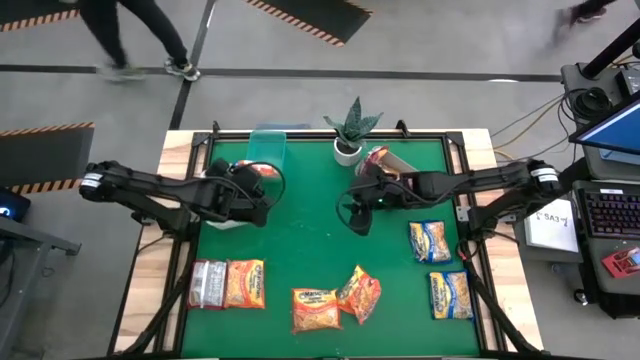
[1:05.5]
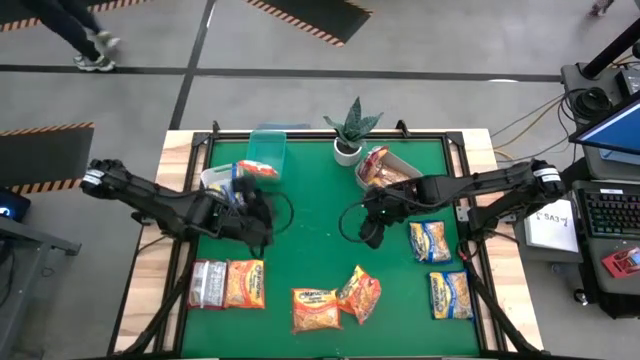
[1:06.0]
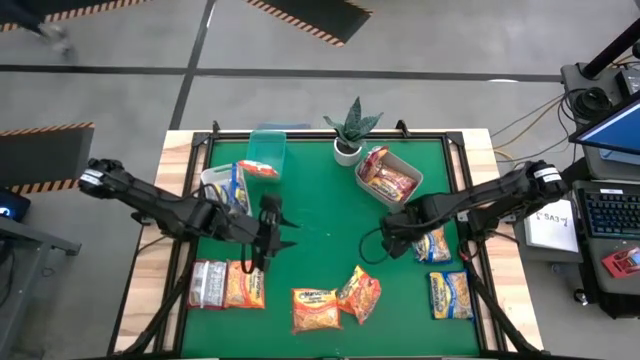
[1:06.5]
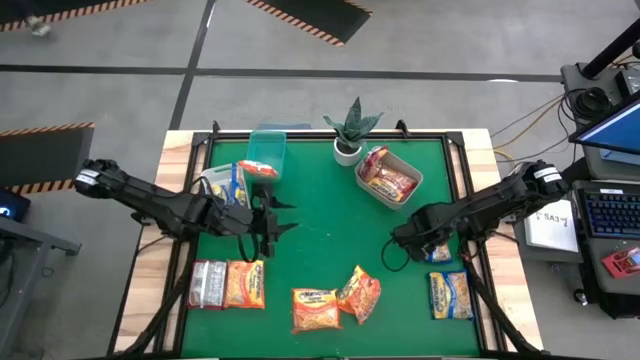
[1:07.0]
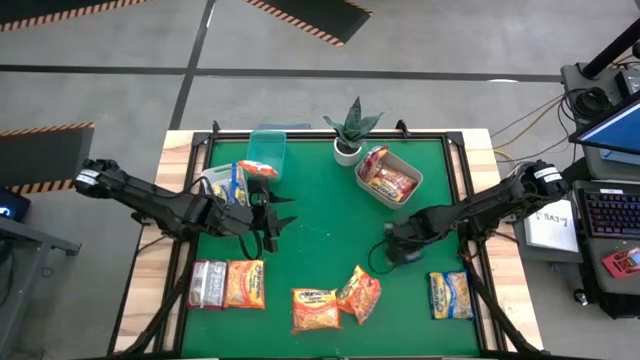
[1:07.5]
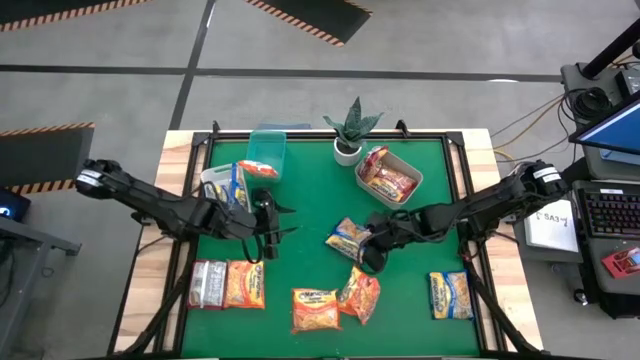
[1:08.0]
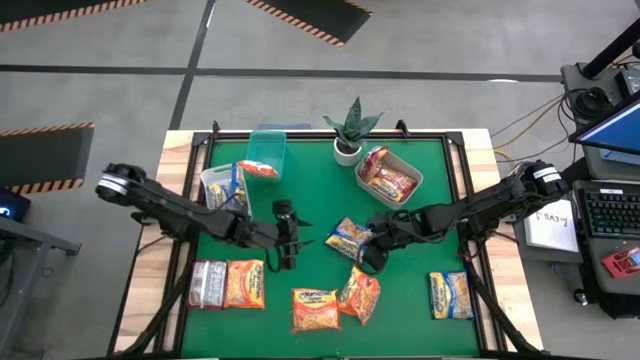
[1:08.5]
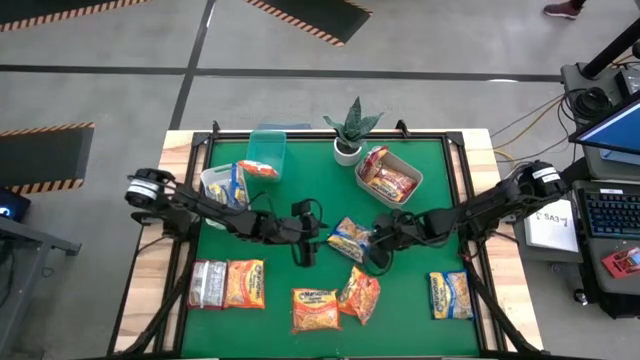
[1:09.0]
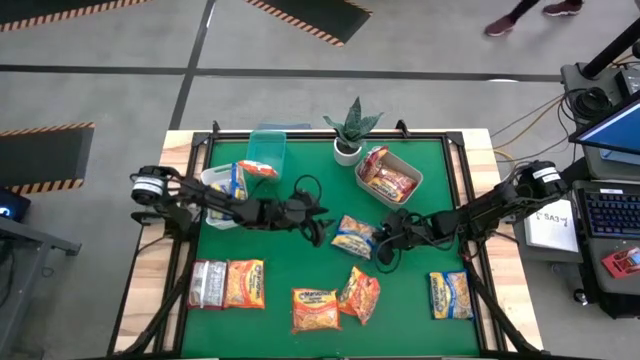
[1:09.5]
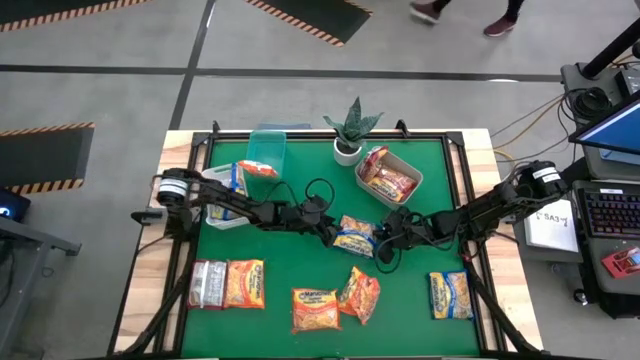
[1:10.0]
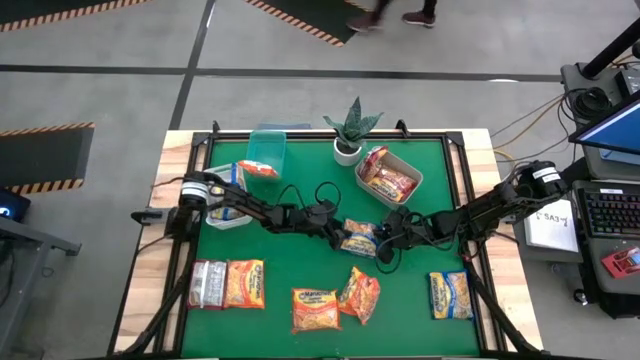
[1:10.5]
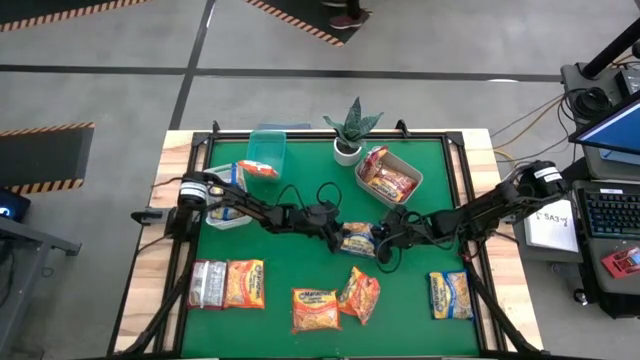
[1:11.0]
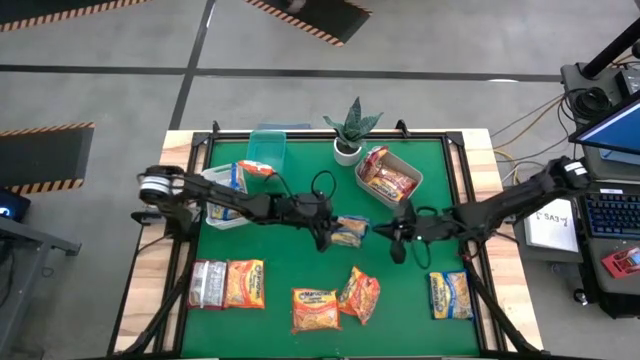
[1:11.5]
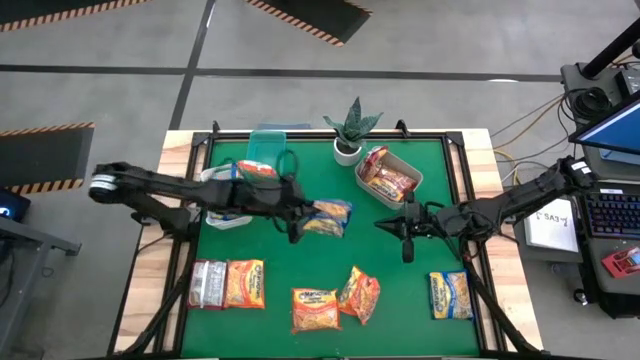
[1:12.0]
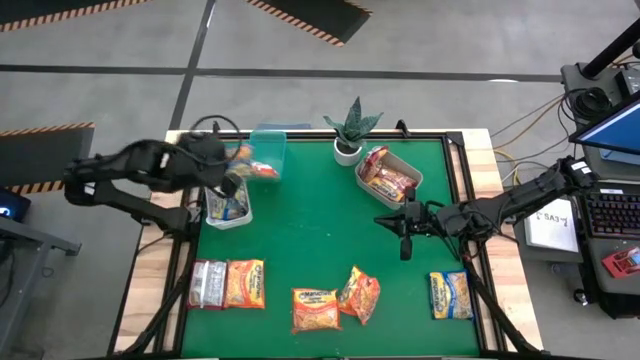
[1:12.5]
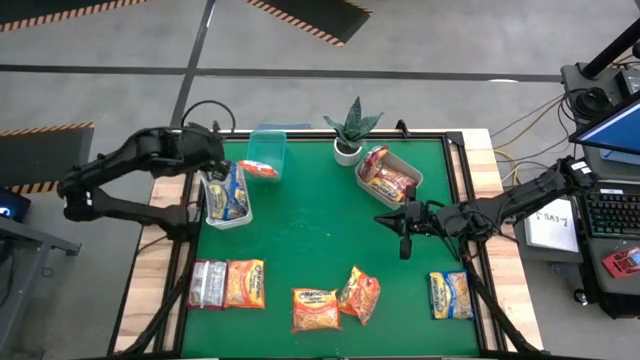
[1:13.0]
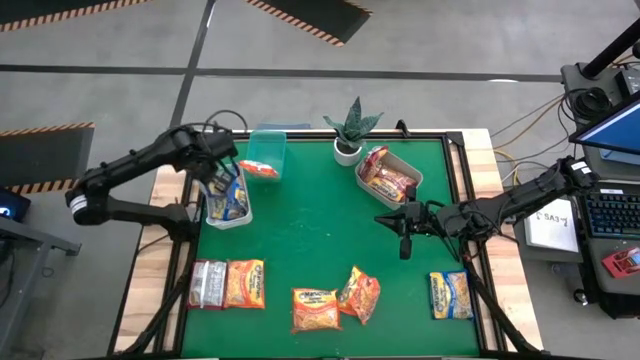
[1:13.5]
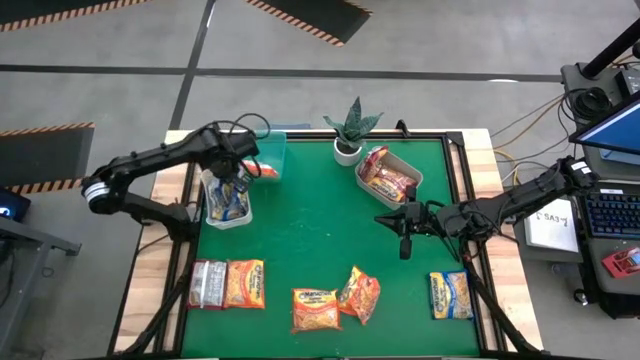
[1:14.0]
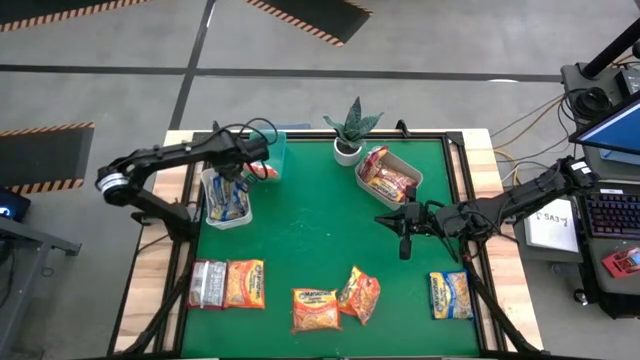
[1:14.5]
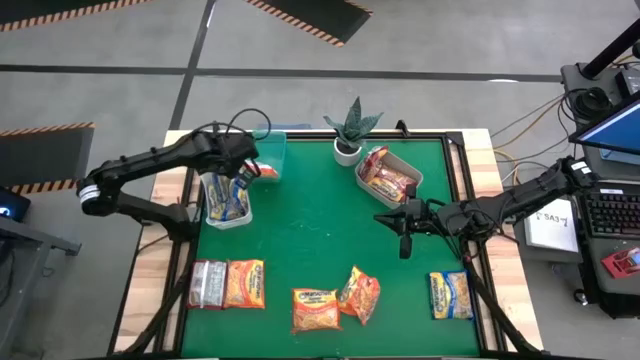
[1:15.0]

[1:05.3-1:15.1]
Task: Sort Maruchan noodles
Put the blue noodle pack into the white bin

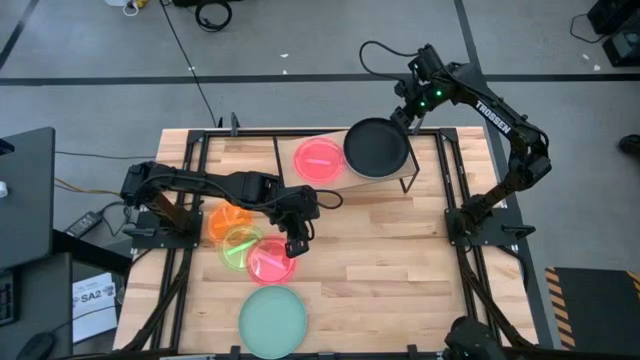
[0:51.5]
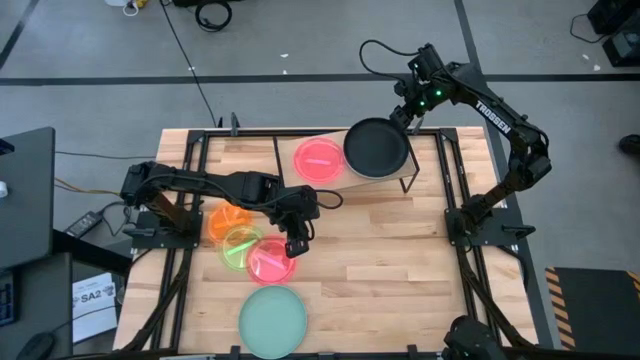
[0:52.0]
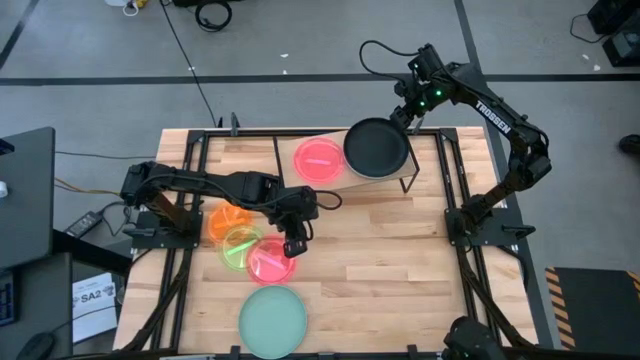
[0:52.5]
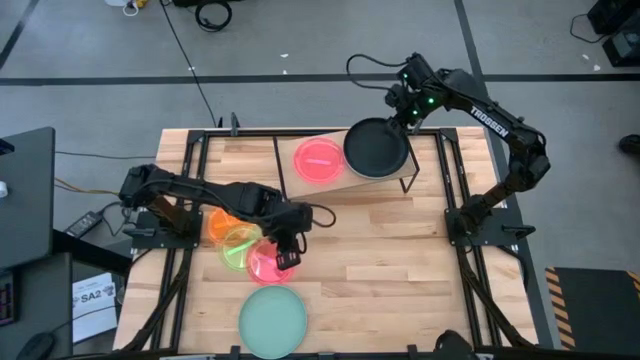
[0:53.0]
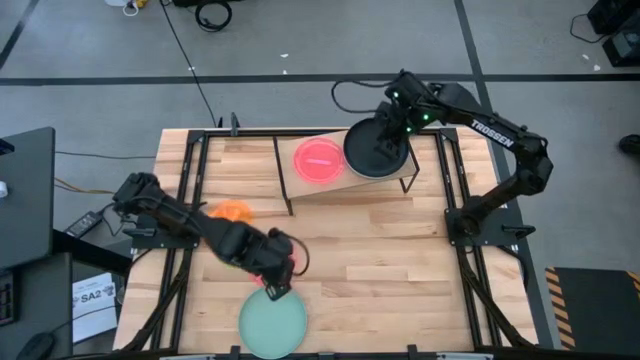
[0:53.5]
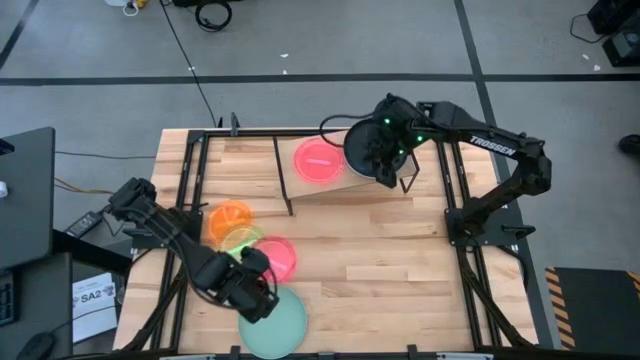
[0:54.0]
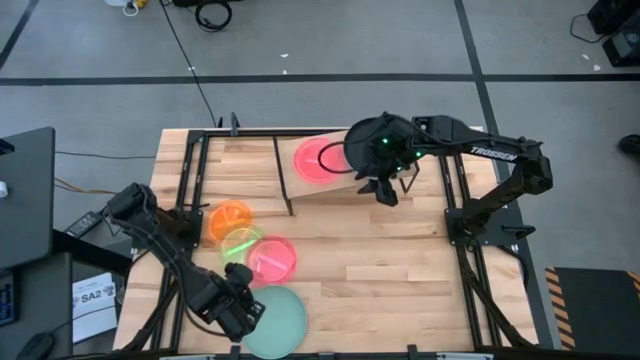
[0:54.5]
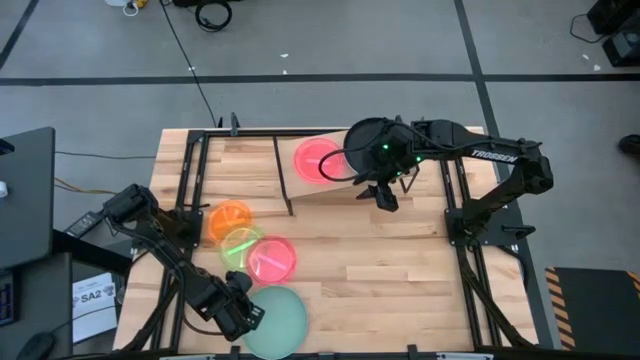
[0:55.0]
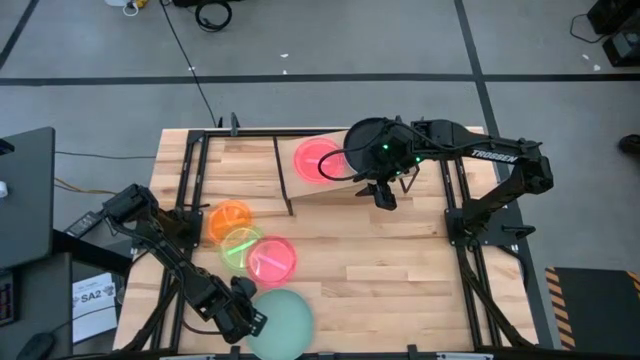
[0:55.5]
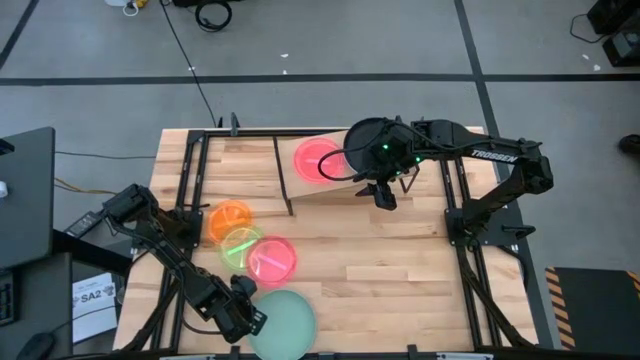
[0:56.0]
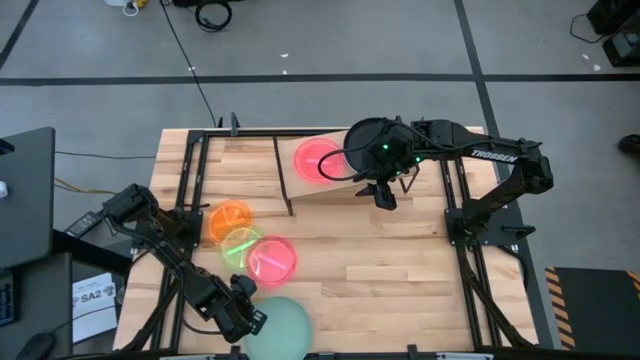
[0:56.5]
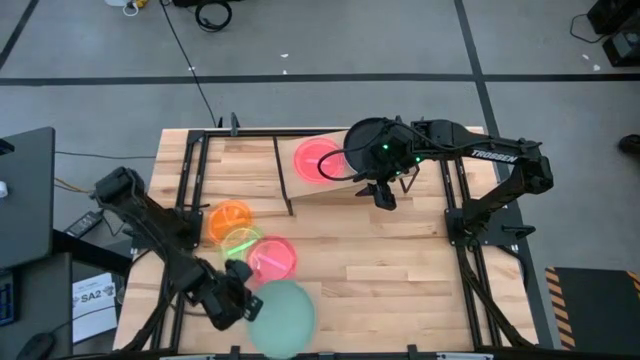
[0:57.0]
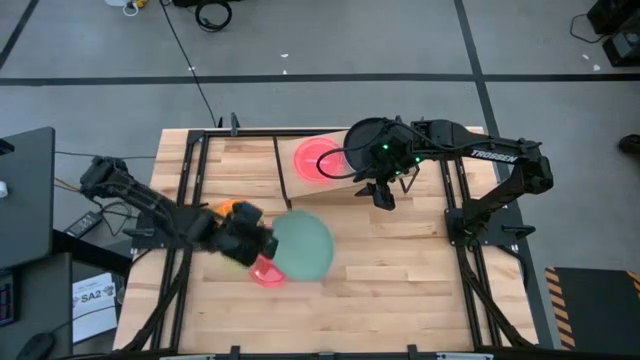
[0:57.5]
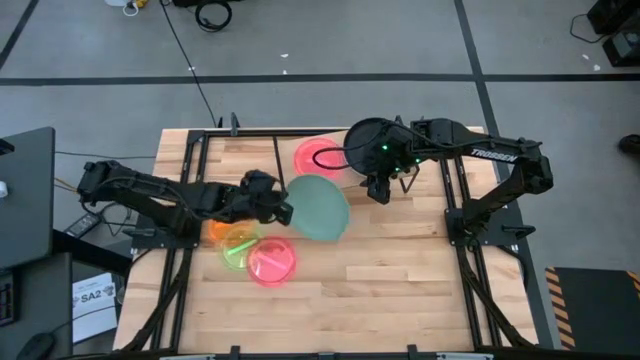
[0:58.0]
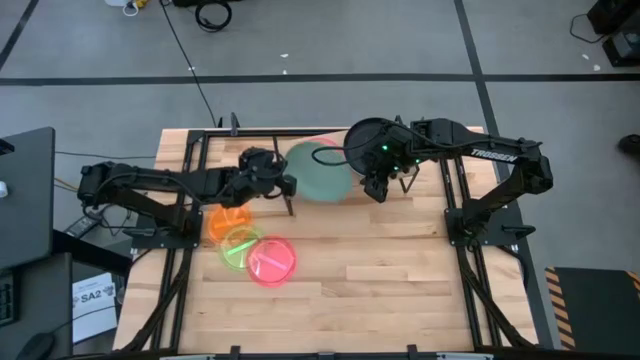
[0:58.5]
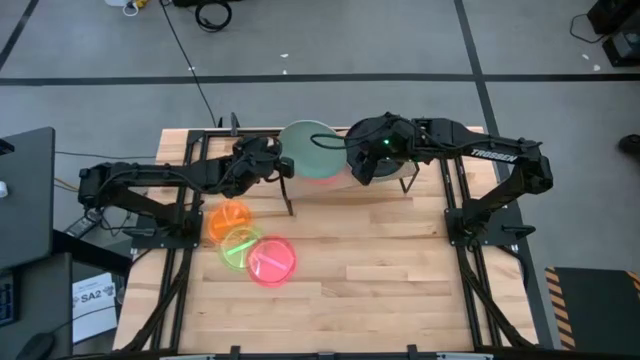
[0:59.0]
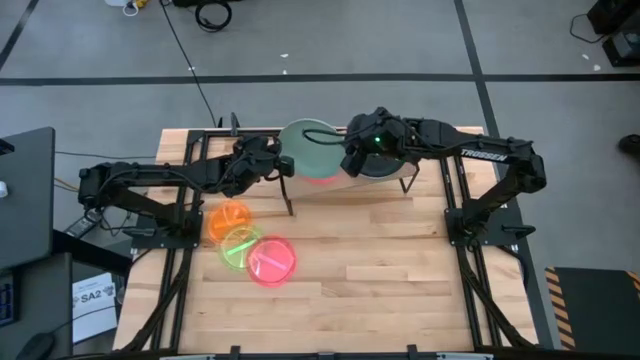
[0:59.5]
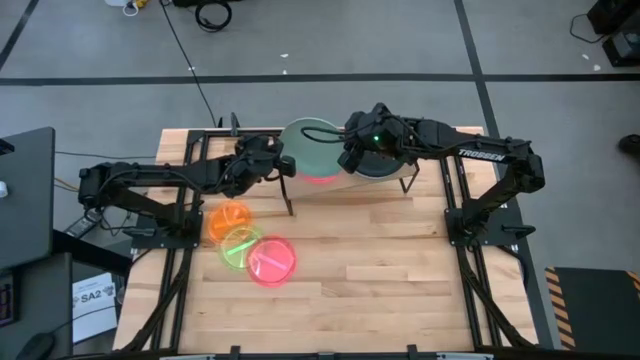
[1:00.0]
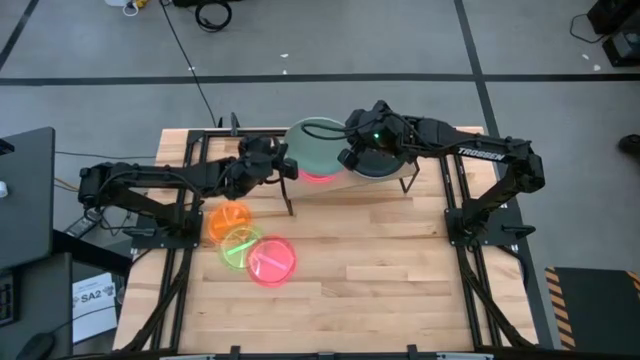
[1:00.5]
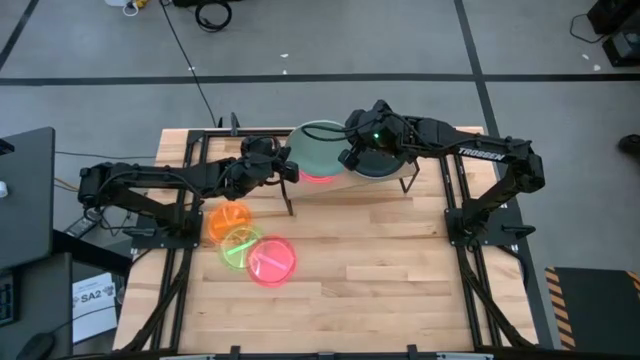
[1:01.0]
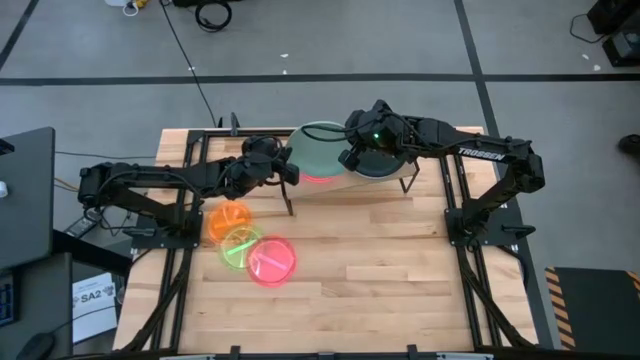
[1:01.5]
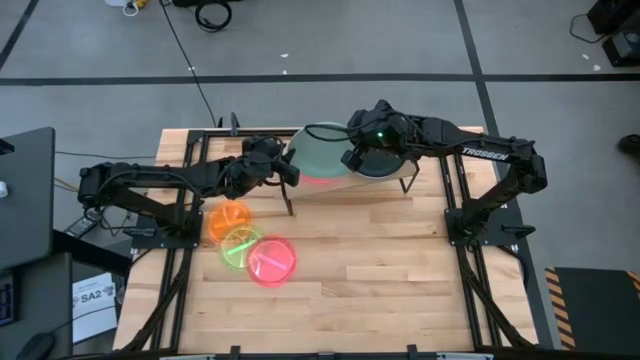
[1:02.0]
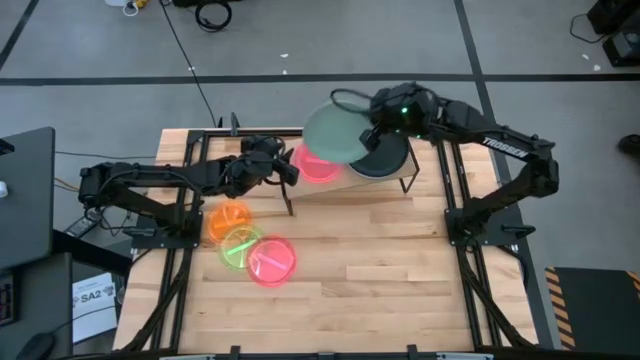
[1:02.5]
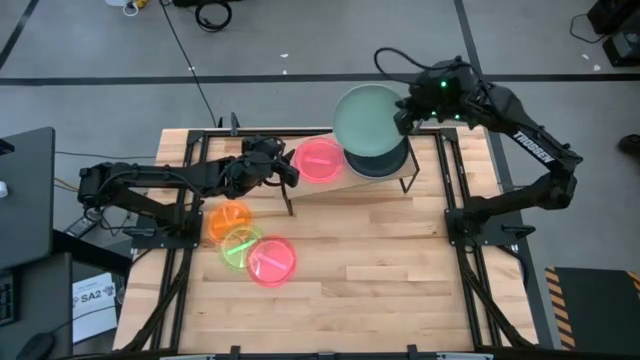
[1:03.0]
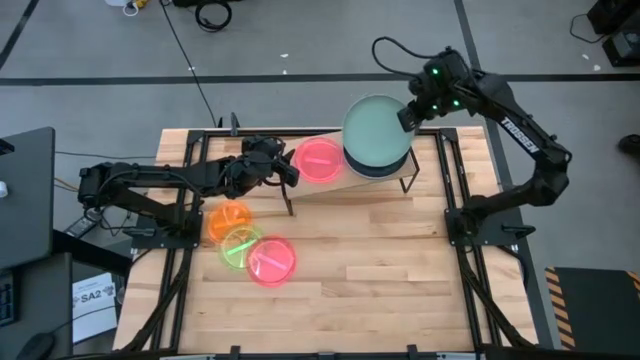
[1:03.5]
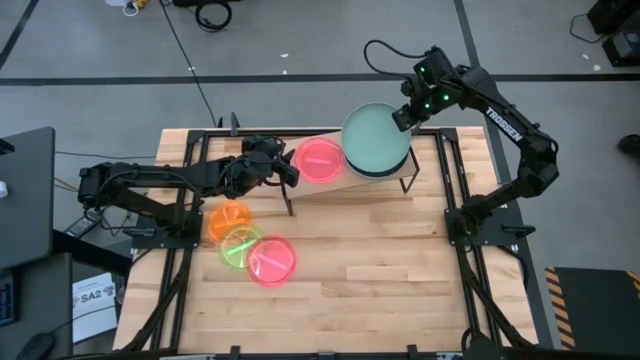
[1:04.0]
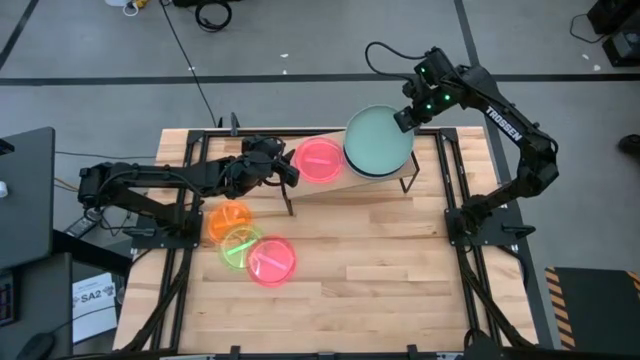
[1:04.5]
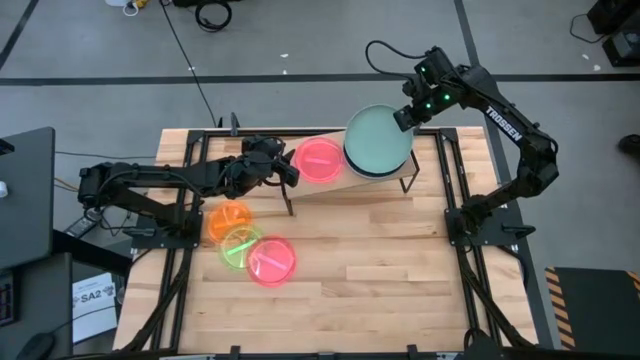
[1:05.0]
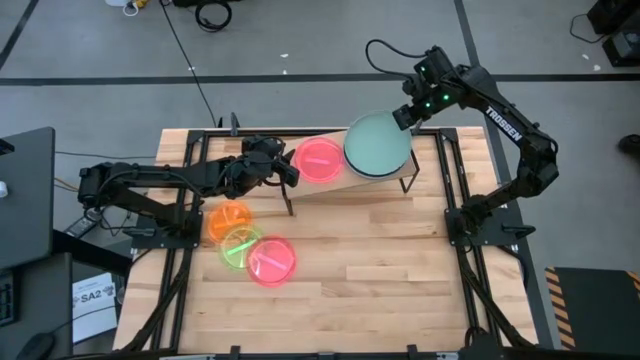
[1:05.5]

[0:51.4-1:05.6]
Task: Place and stack plates onto a shelf
Stack the large light blue plate on top of the large black plate on the shelf
